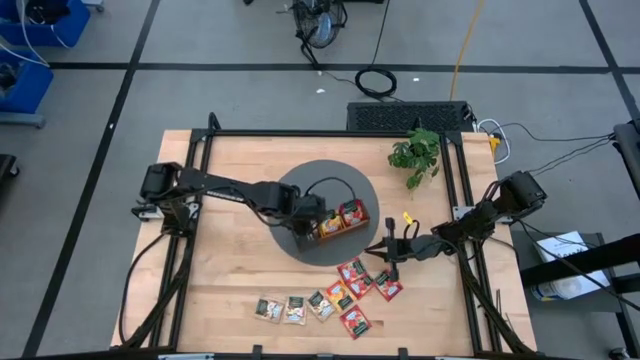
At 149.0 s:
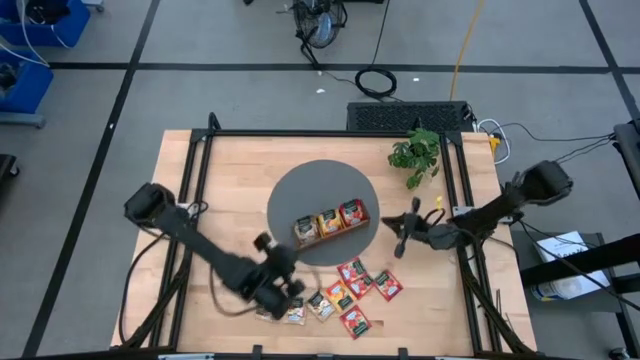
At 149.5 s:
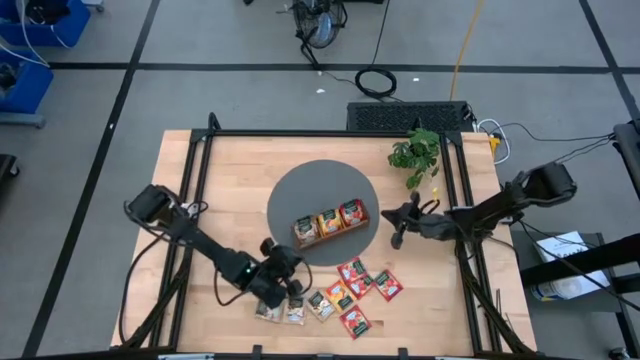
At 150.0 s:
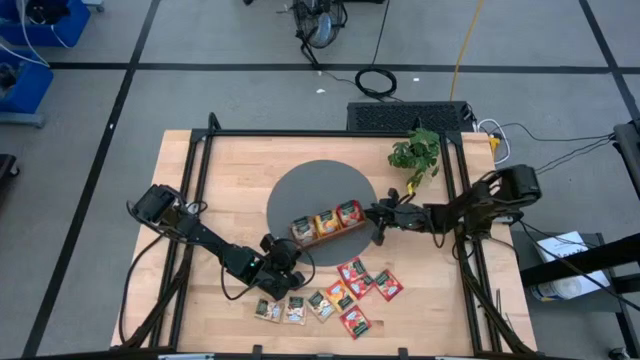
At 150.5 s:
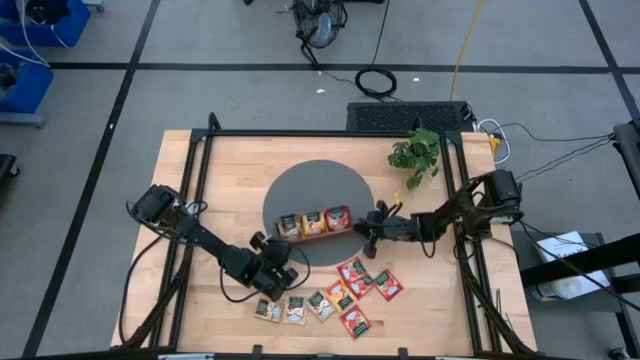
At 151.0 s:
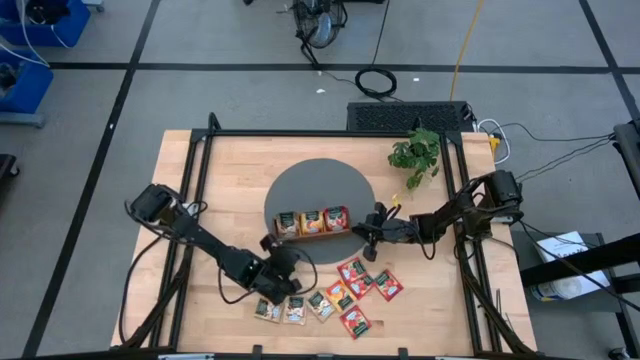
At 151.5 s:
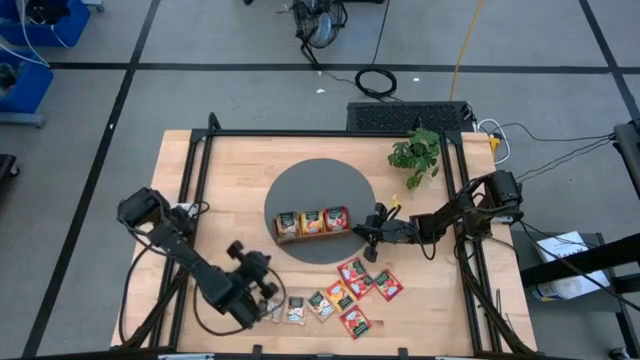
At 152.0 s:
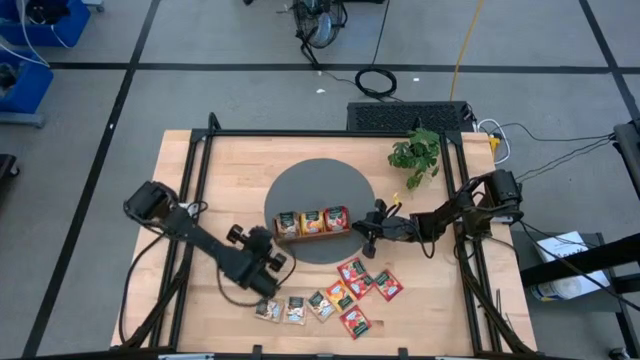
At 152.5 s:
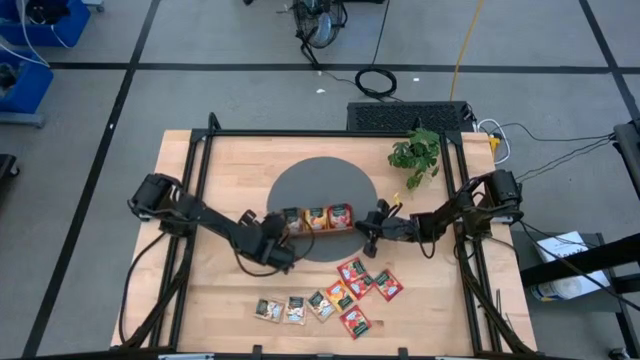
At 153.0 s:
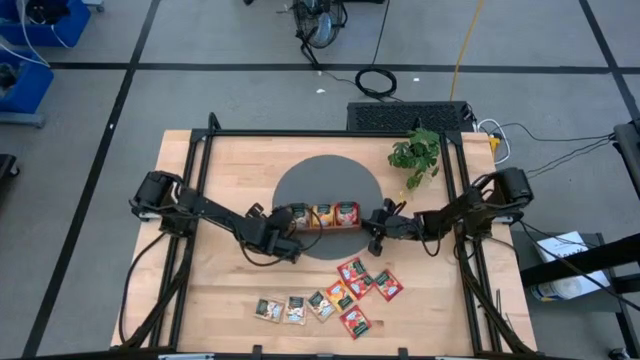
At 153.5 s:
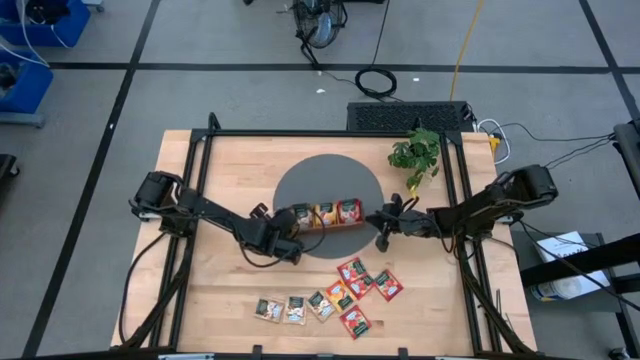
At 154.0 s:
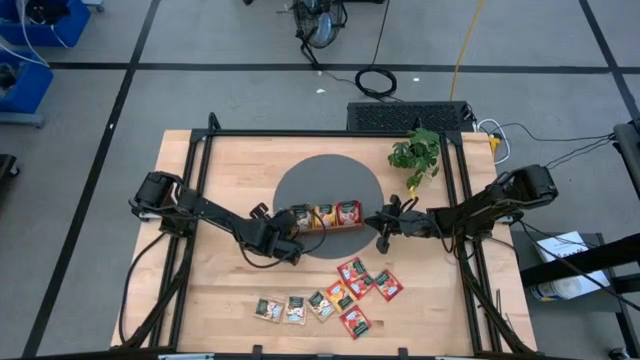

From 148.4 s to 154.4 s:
Task: Pick & Place Tea
Adjust the wooden organizer

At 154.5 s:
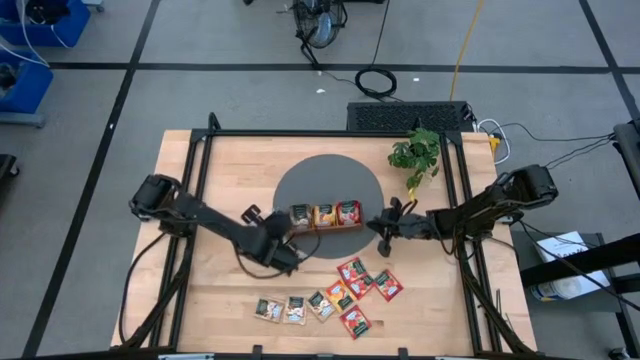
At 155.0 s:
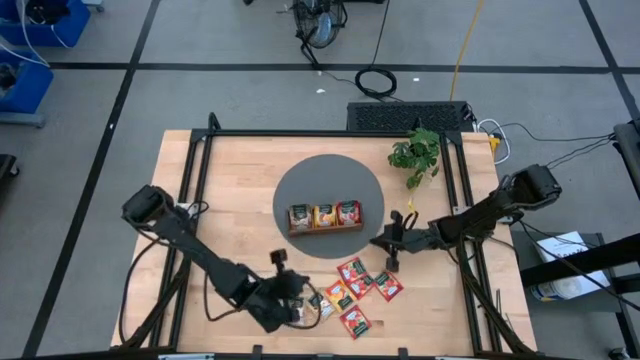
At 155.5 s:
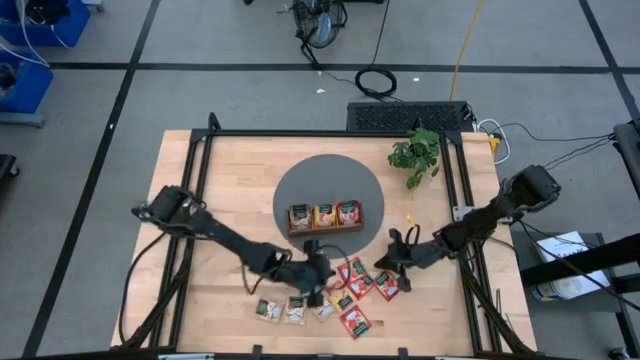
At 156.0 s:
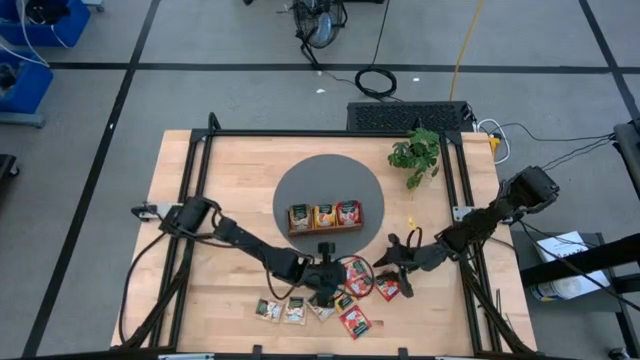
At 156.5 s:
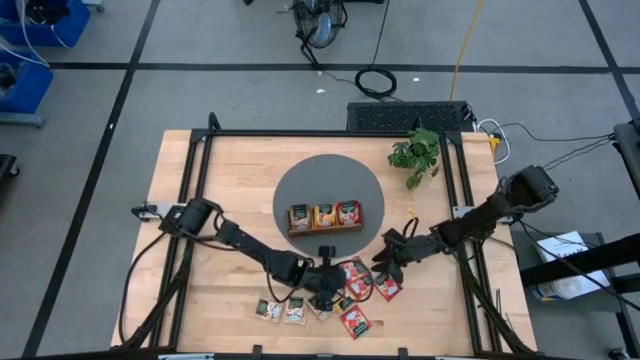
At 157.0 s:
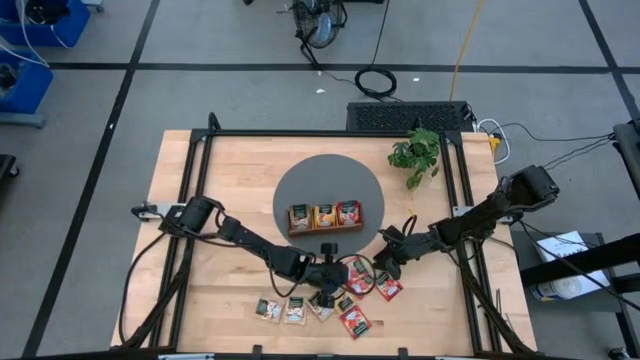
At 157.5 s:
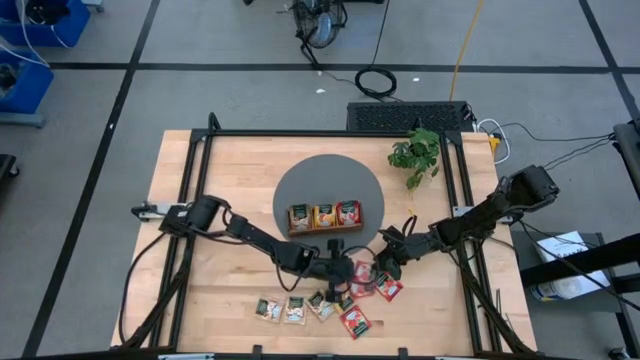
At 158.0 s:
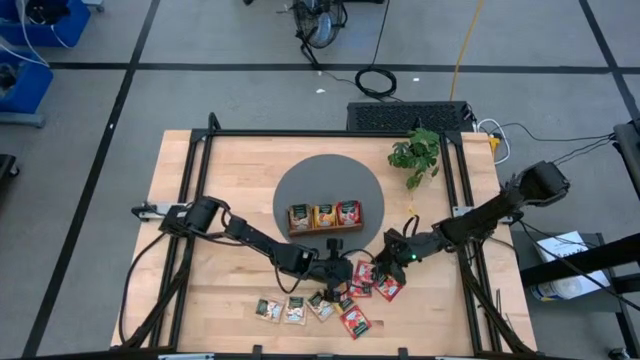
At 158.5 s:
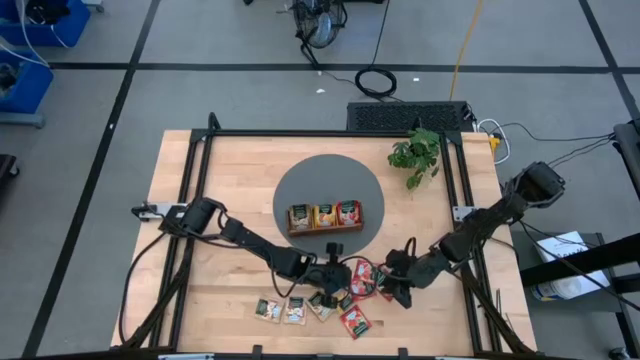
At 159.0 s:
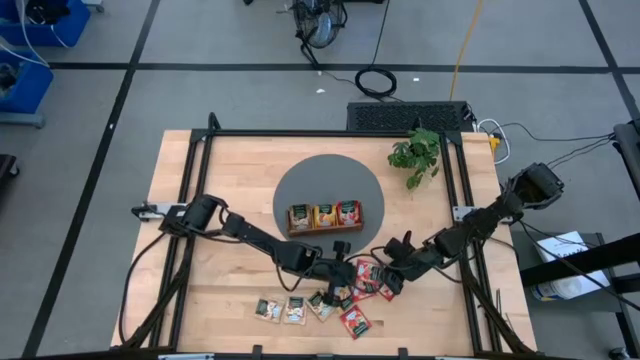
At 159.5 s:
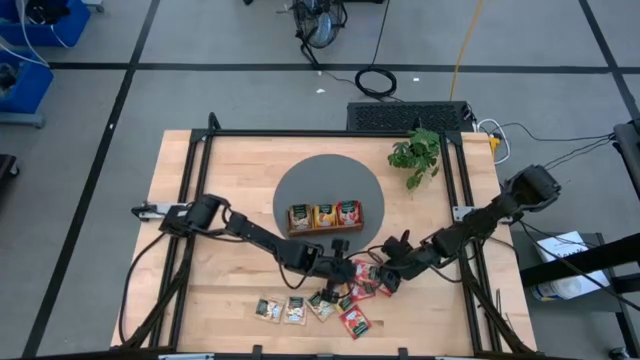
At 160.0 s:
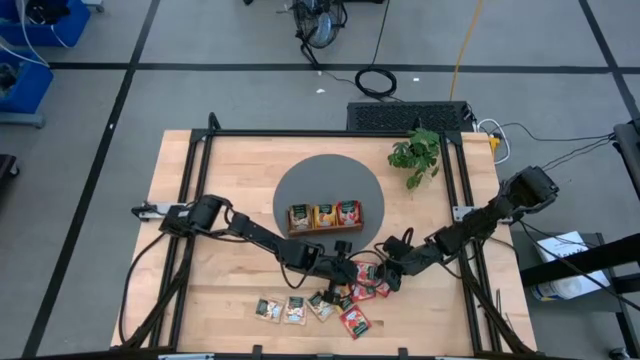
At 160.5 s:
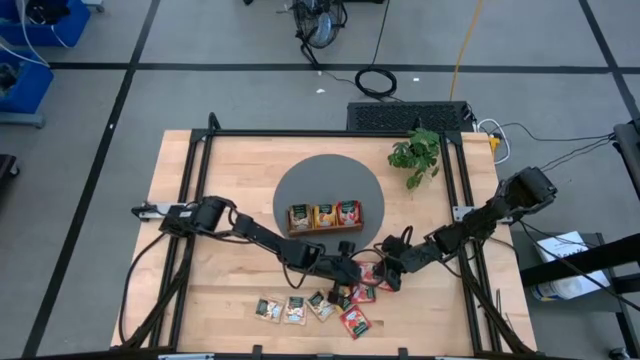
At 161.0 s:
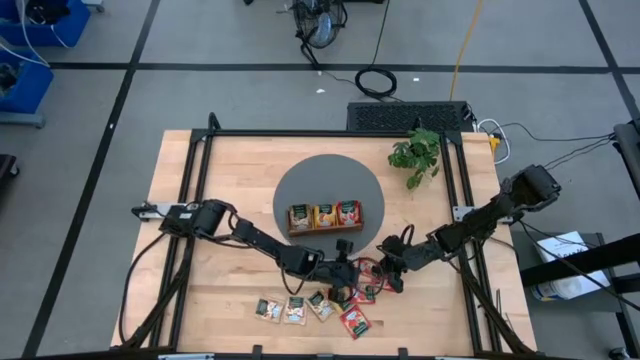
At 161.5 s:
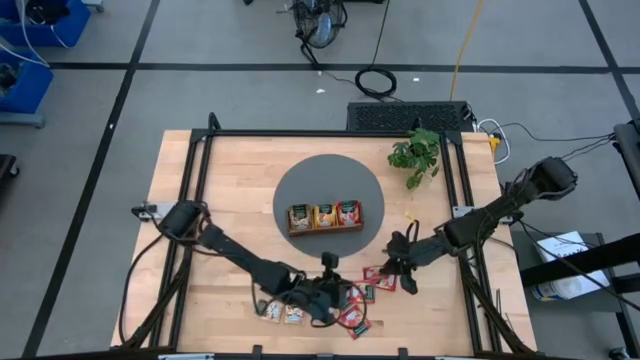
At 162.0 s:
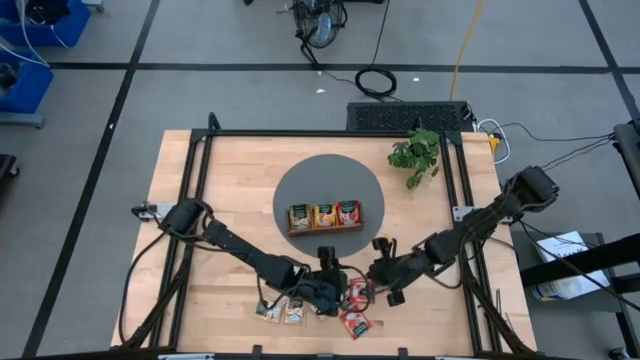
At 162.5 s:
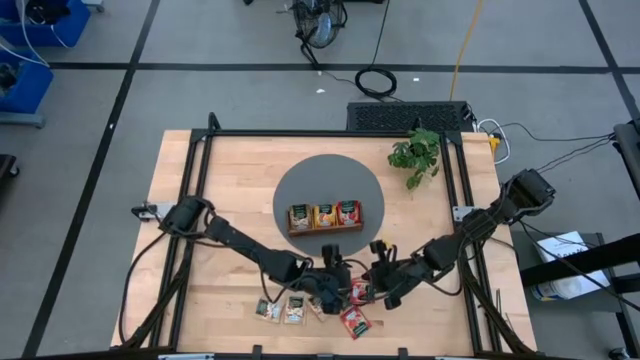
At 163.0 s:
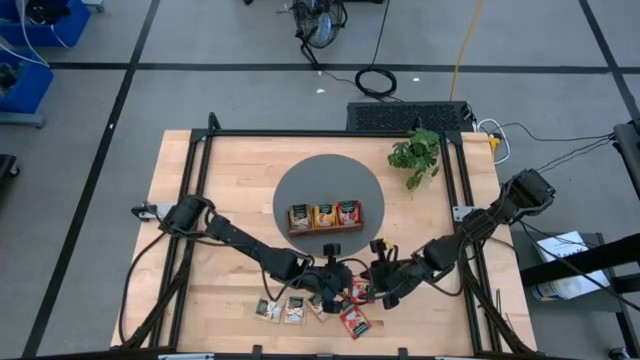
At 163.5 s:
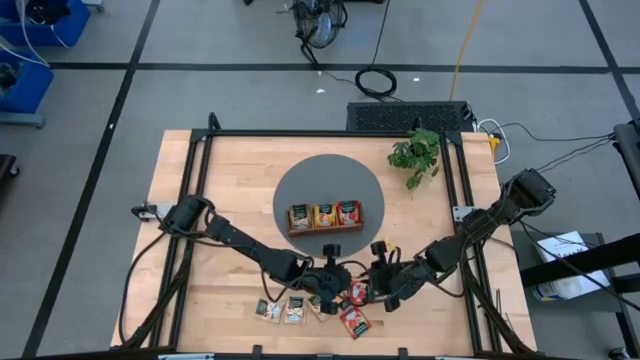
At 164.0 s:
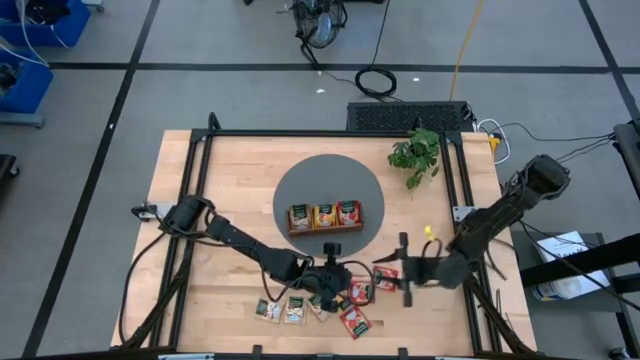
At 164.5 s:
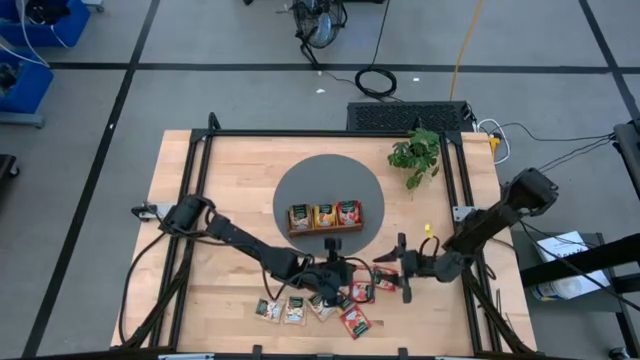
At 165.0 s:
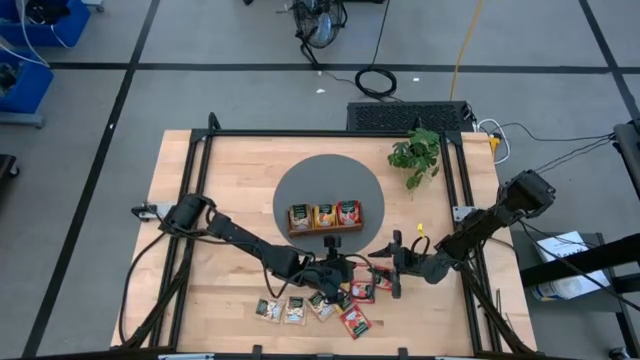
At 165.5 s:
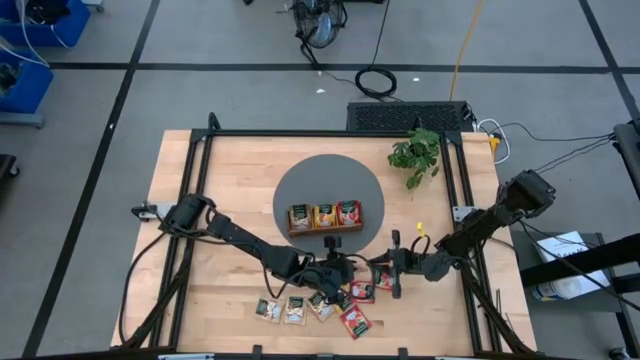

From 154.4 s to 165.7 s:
Put the strawberry tea sachet into the right compartment of the wooden organizer

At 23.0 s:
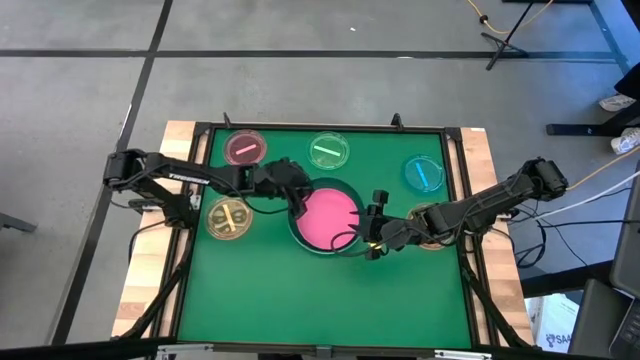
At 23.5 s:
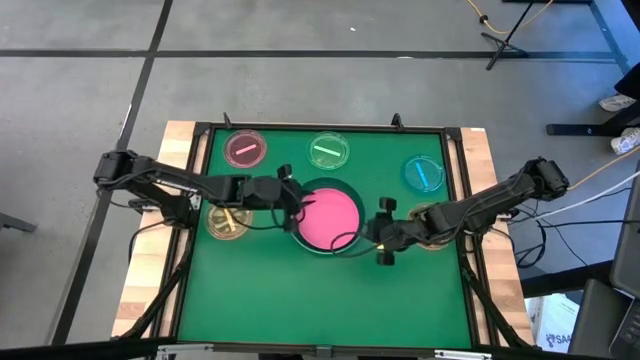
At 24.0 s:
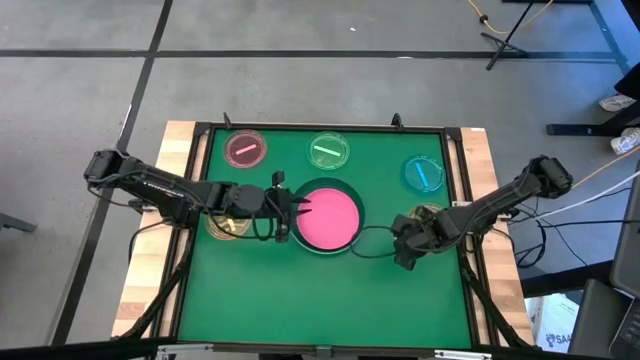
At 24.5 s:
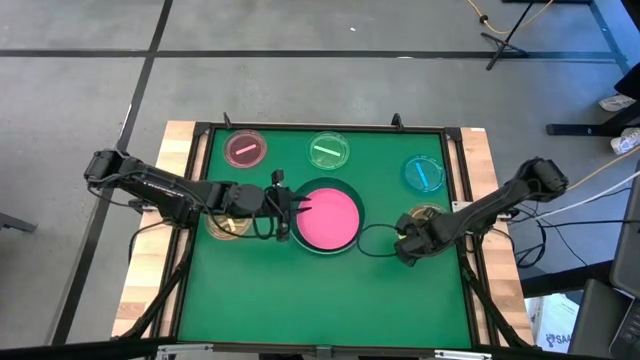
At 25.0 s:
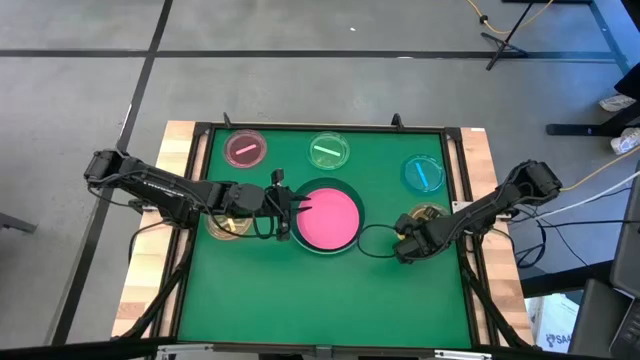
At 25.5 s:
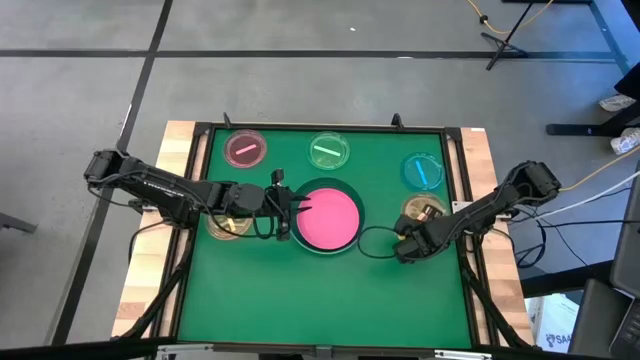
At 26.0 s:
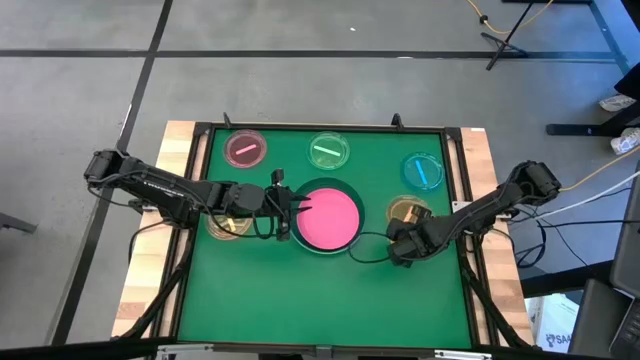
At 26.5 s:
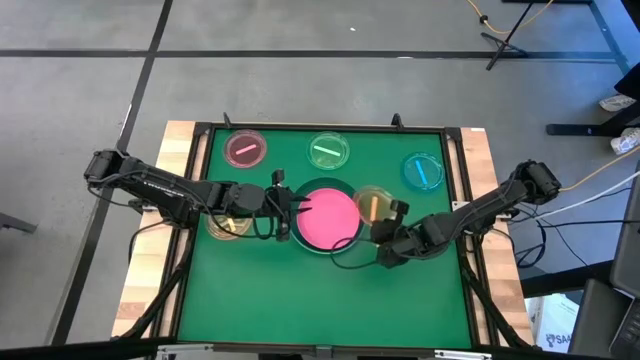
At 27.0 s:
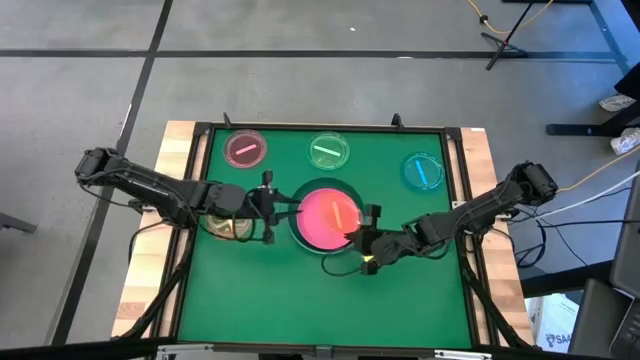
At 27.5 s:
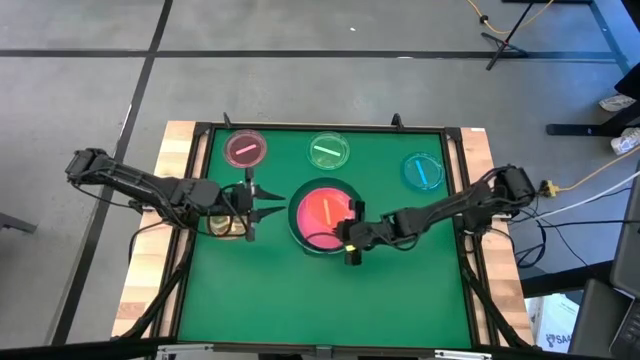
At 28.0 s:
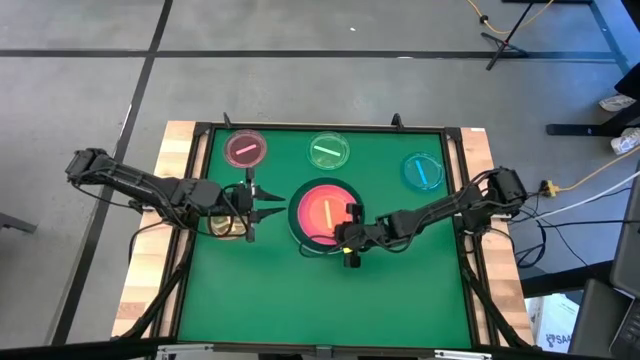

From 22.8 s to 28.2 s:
Task: Stack plastic plates
Stack the right orange transparent plate on the pink plate
